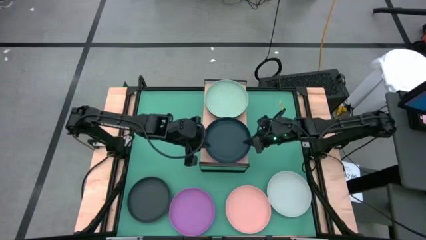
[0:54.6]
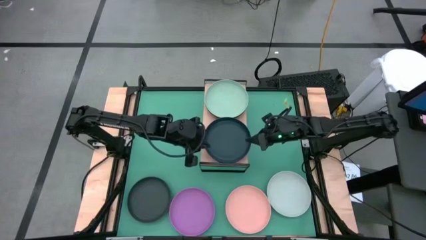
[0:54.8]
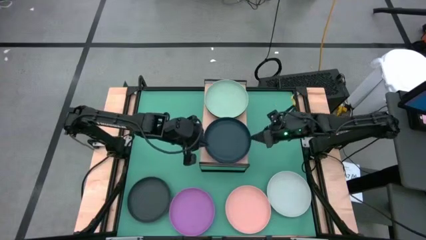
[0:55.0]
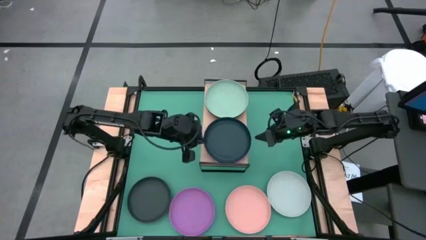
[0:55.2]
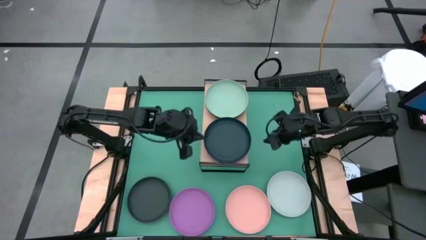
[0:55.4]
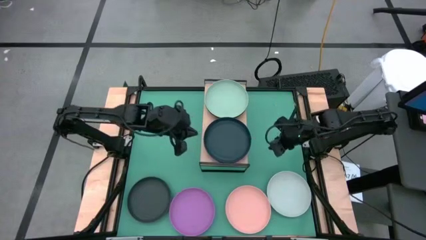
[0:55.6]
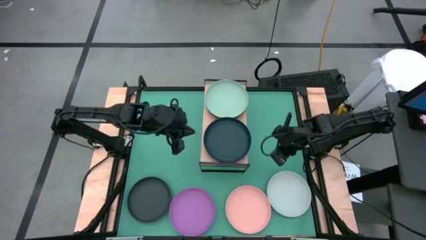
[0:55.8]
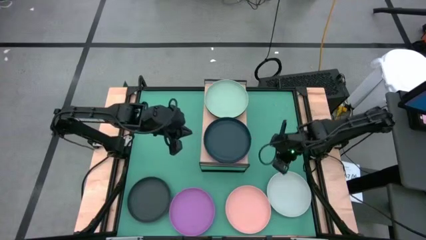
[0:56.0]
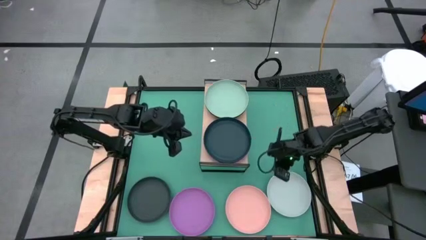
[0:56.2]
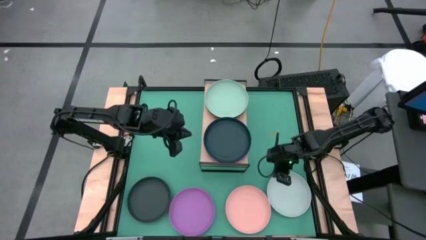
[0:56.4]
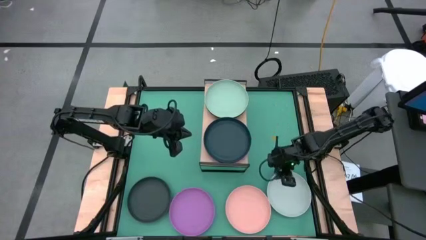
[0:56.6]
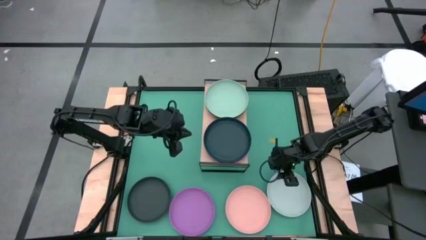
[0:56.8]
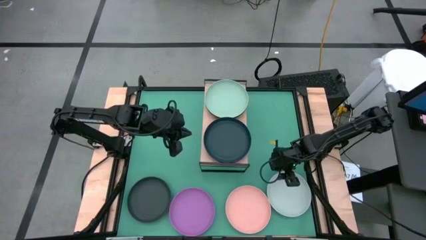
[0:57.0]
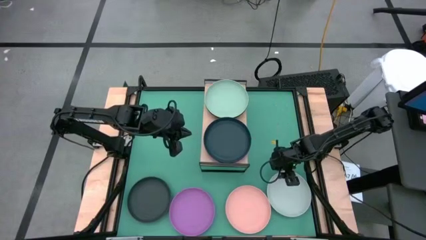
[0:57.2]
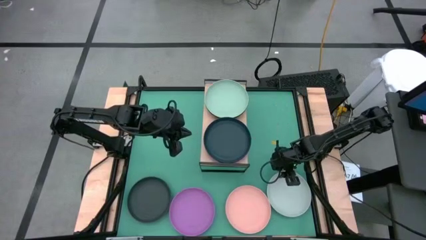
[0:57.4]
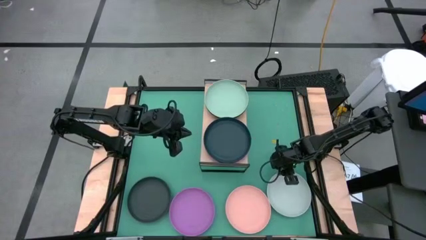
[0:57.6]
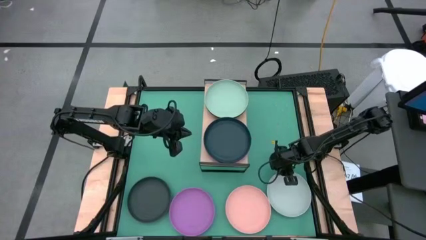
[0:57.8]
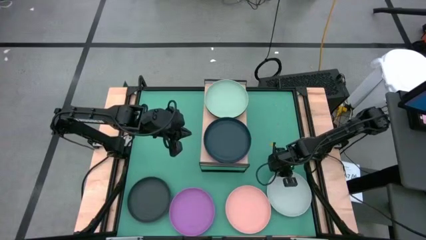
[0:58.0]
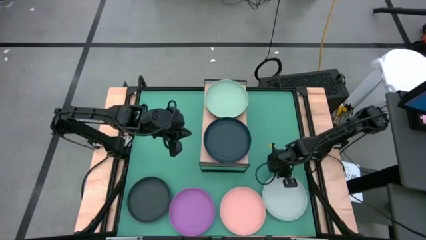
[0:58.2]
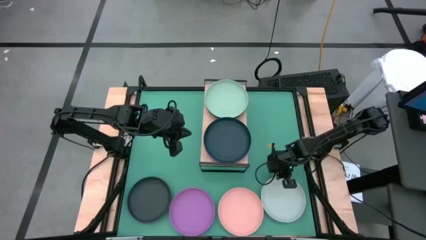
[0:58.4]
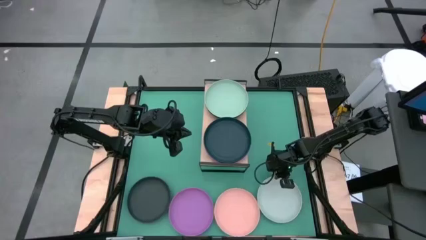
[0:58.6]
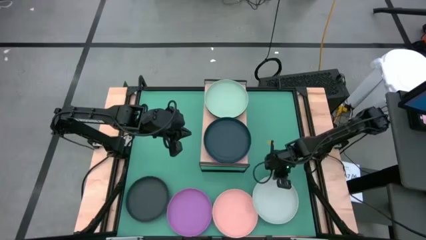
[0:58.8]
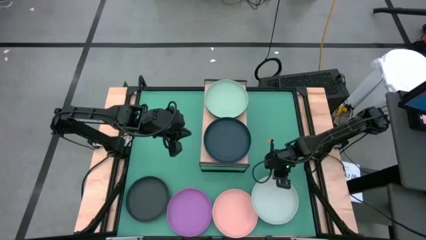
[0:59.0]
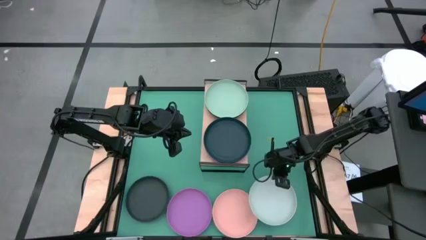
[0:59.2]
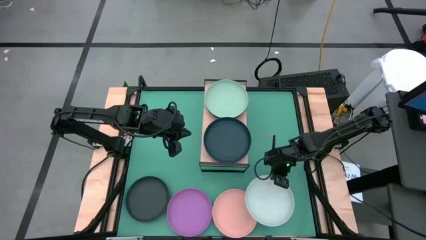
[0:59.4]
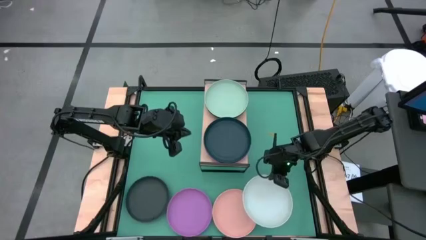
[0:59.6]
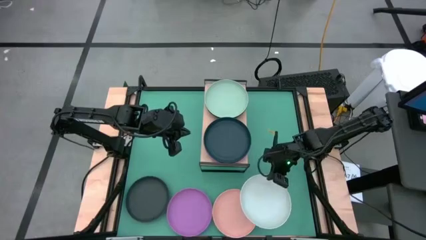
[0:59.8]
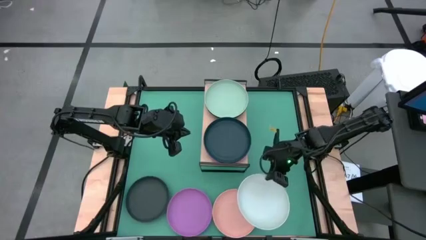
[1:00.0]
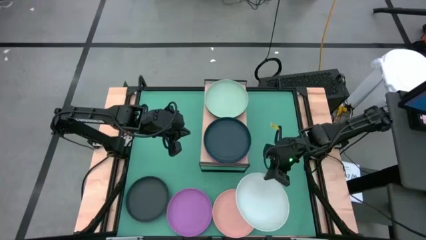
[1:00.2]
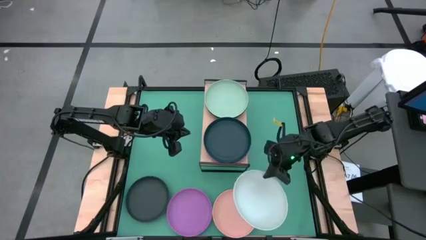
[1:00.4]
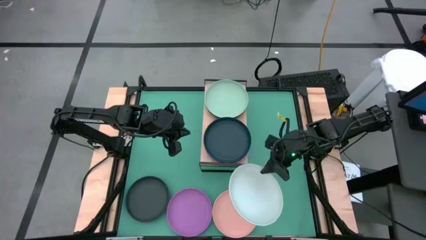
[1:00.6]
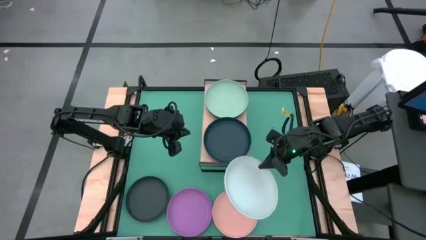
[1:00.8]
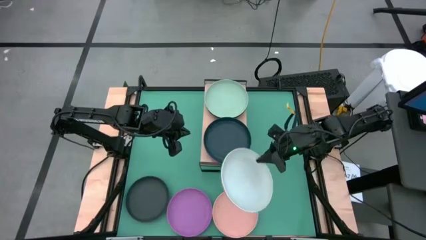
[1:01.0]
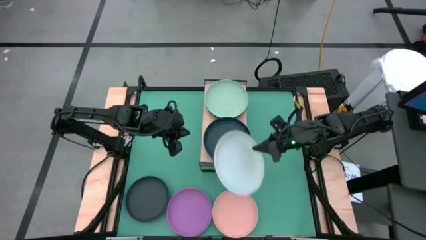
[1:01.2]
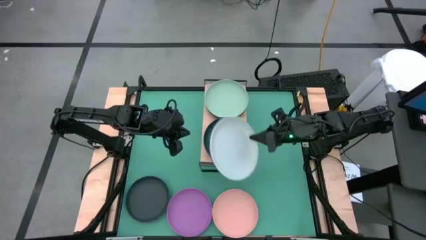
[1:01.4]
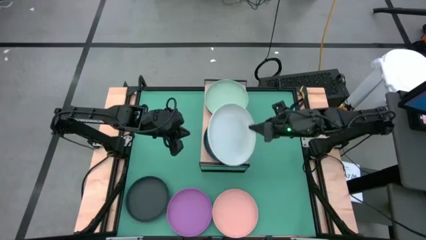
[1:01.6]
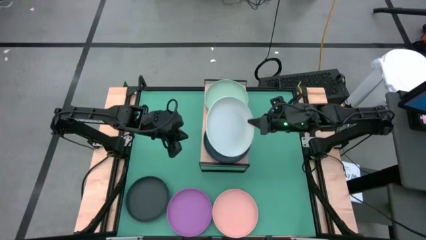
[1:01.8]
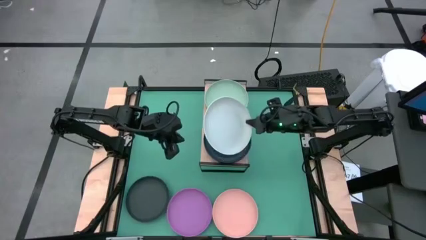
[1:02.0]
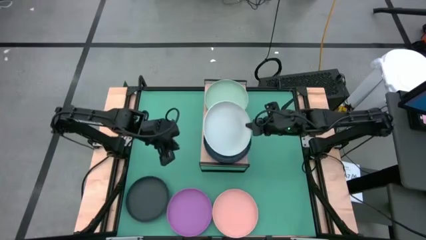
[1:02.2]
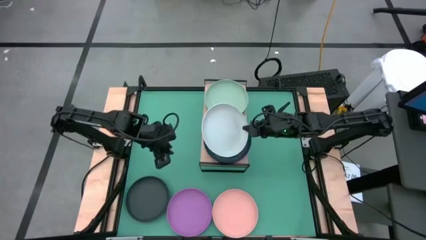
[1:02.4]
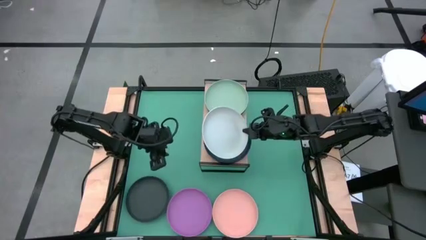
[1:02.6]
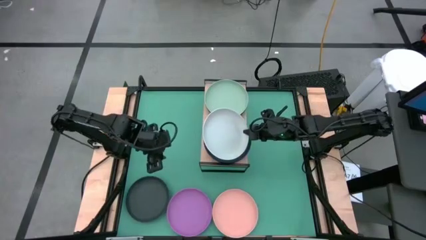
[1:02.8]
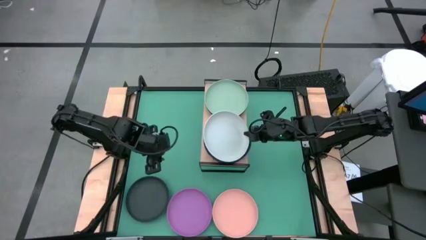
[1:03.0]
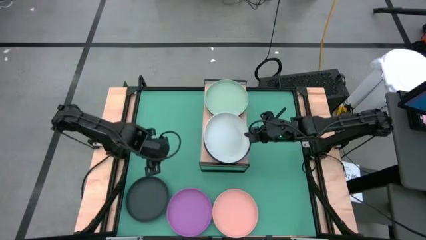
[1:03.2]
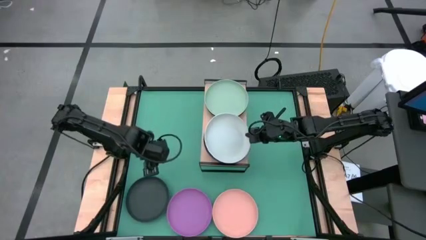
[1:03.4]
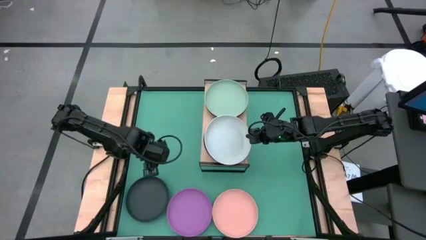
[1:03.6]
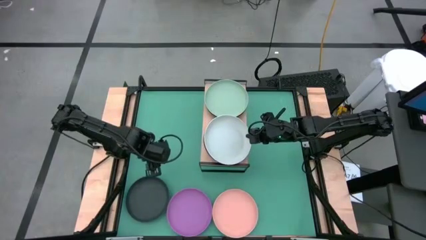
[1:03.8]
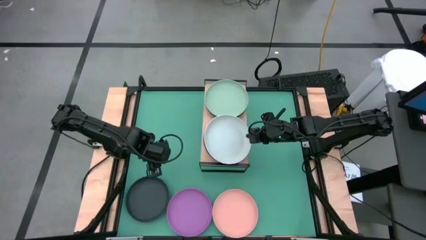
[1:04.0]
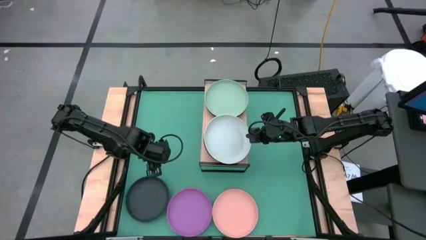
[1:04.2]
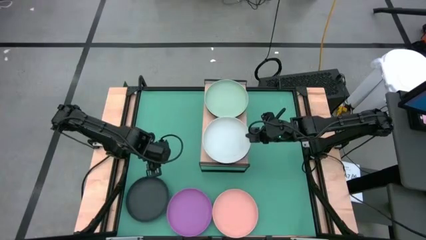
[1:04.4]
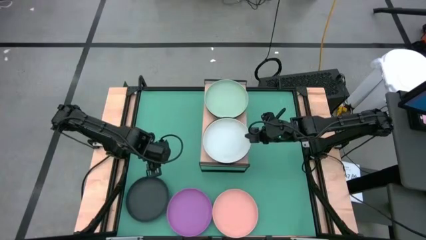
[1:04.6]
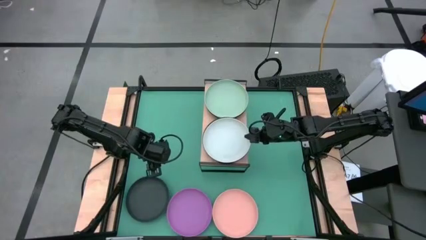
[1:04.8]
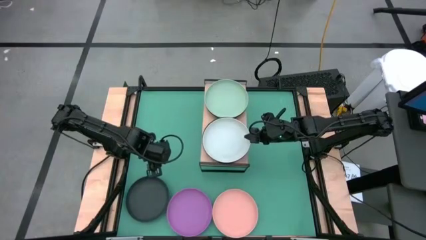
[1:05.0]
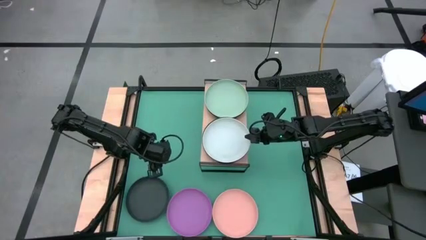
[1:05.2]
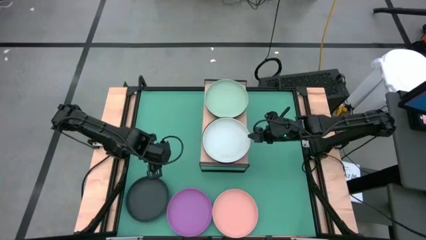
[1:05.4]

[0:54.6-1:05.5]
Task: Place and stack plates onto a shelf
Stack the gray plate on top of the black plate

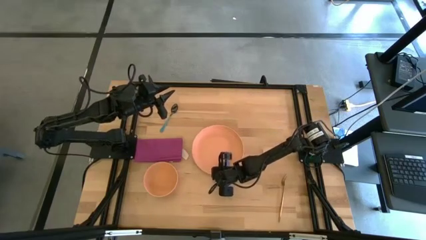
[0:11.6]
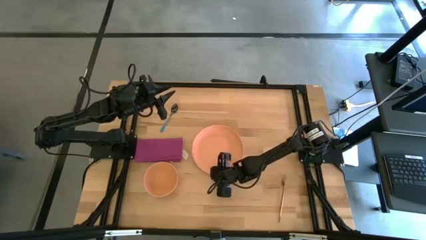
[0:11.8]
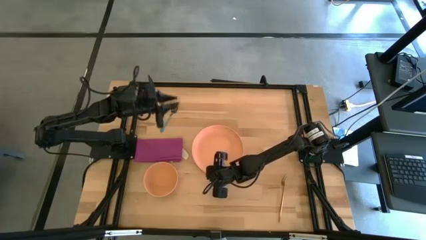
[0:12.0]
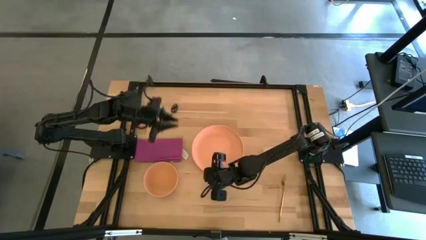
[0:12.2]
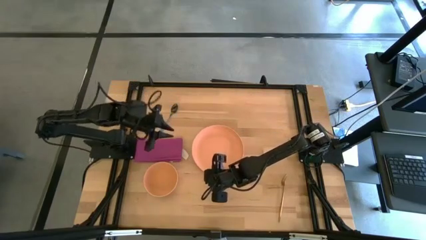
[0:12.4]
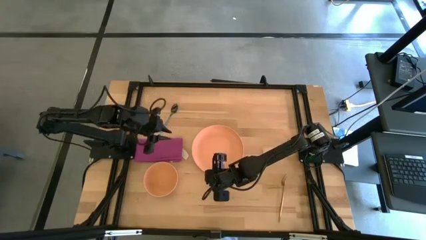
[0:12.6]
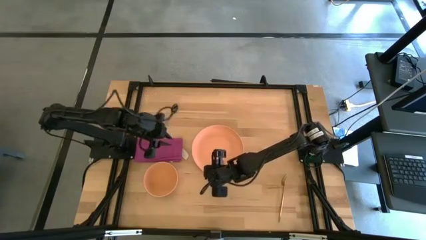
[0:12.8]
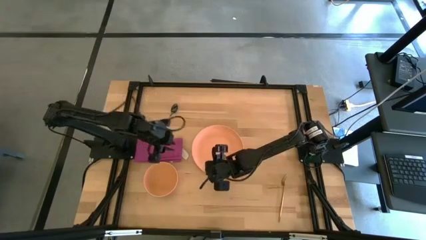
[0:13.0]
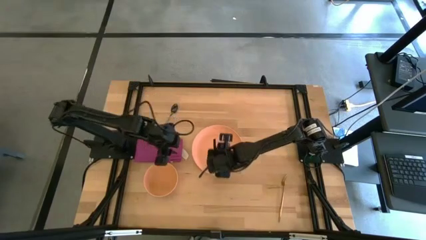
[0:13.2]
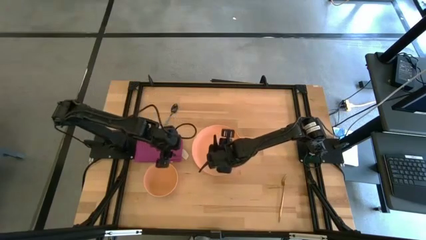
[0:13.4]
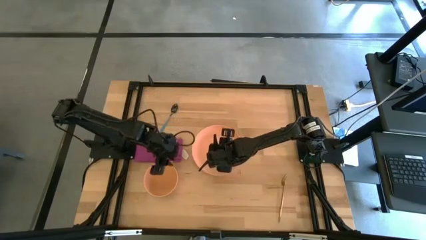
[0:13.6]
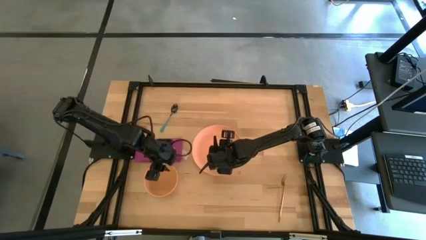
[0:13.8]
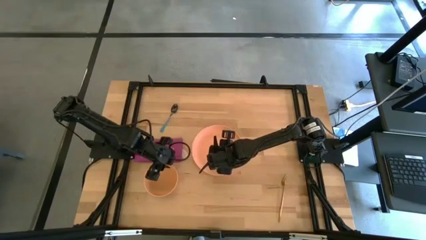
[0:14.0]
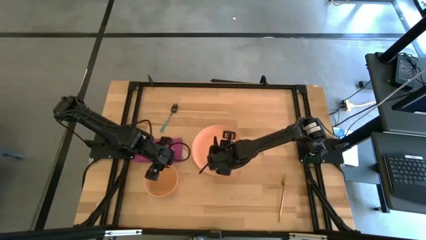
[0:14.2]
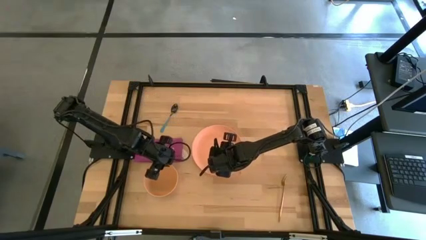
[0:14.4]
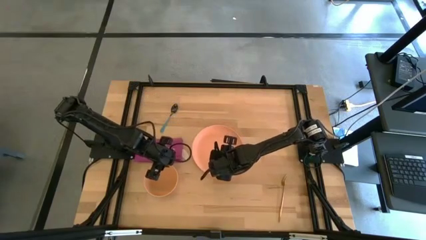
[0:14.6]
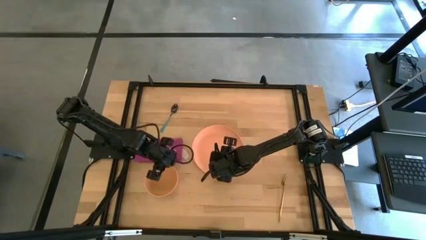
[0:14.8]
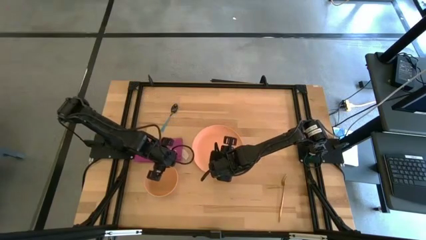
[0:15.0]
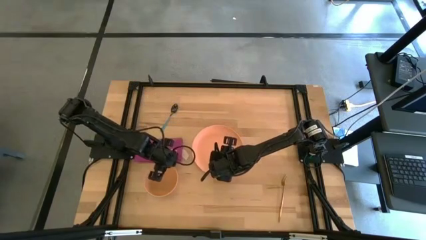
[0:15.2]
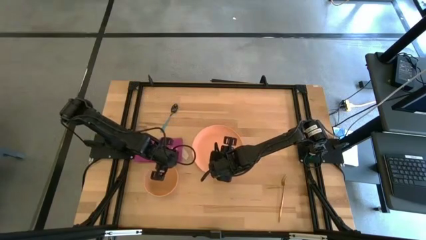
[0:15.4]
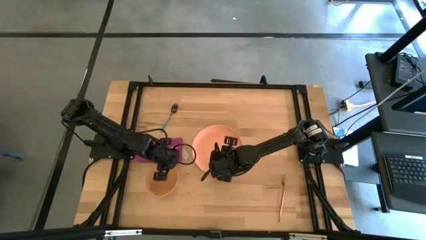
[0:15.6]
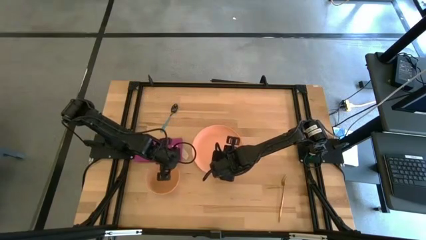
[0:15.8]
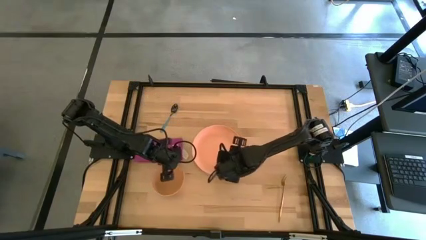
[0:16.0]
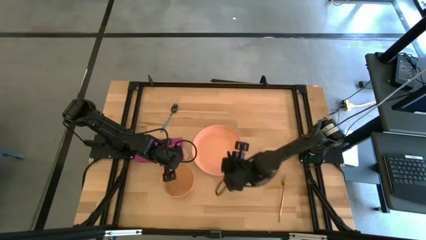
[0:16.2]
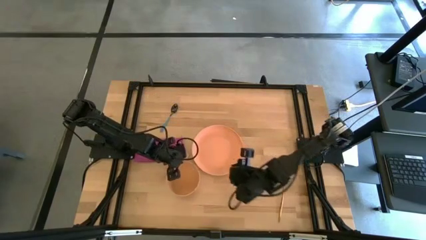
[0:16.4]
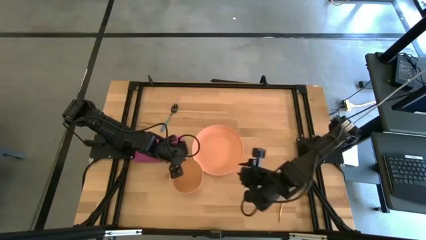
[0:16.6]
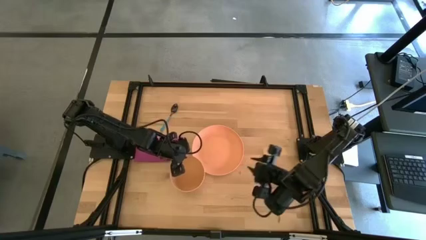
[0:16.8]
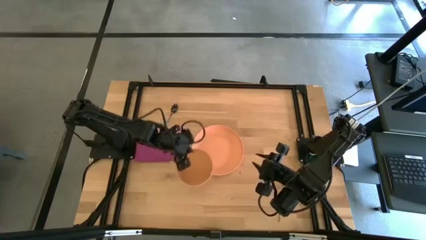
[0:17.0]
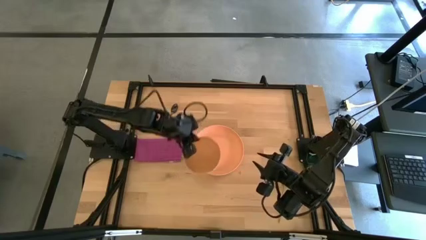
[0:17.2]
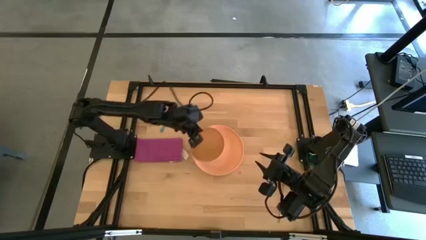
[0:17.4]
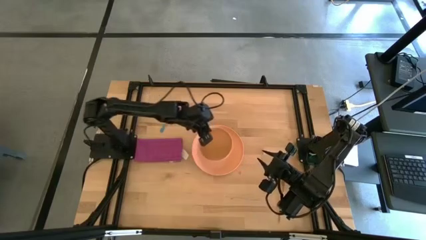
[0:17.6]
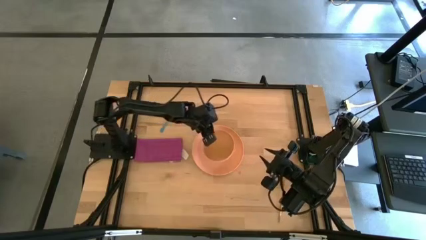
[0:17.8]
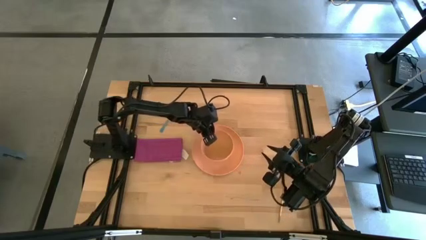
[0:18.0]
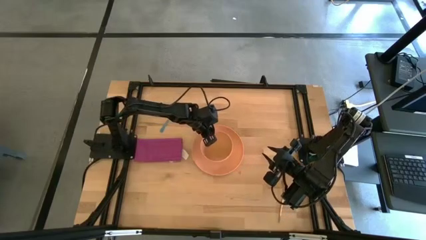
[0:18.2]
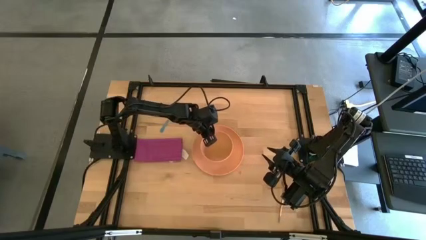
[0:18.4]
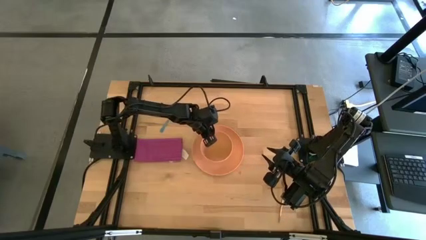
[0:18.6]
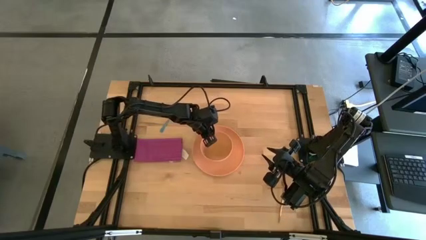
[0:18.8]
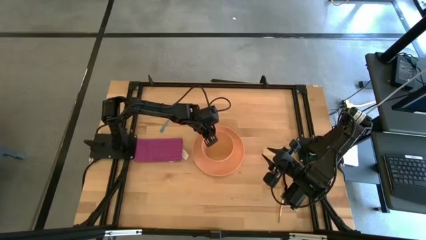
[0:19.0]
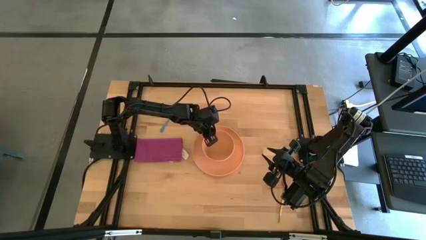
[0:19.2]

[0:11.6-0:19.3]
Task: Set table place
Put the orange bowl on top of the orange plate
